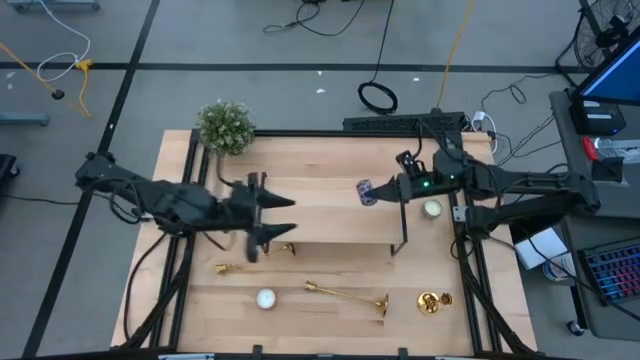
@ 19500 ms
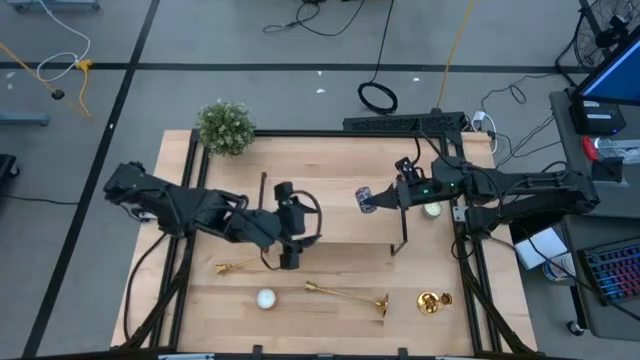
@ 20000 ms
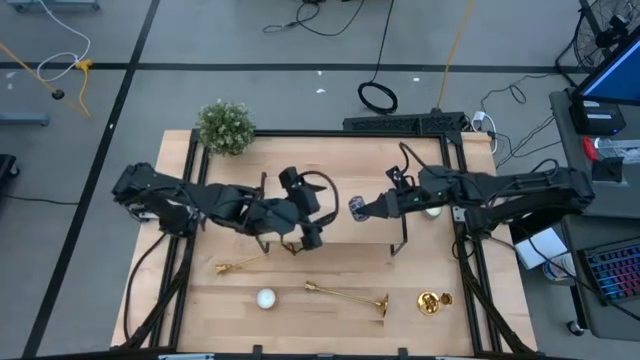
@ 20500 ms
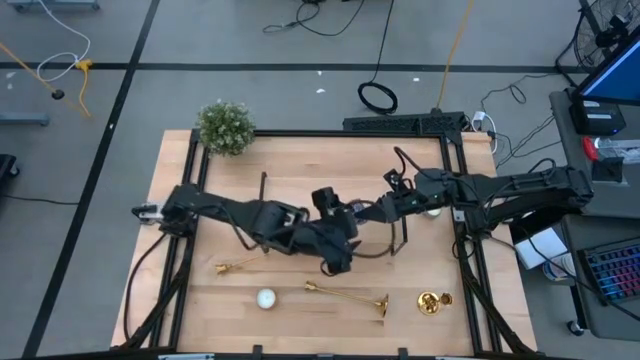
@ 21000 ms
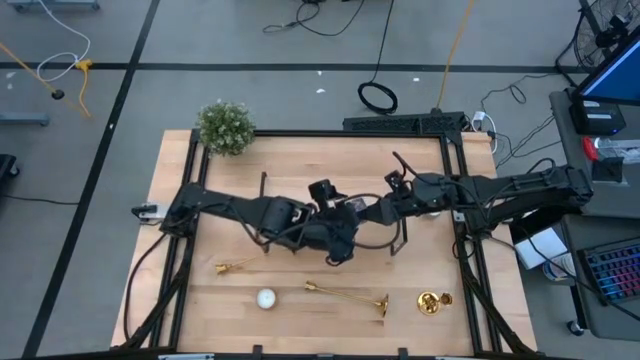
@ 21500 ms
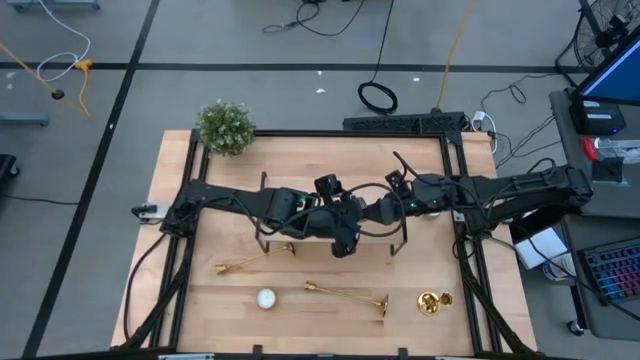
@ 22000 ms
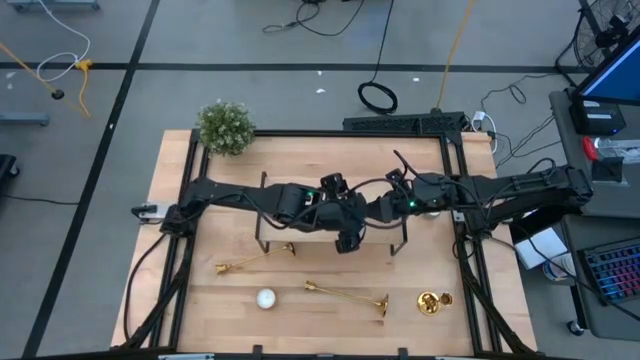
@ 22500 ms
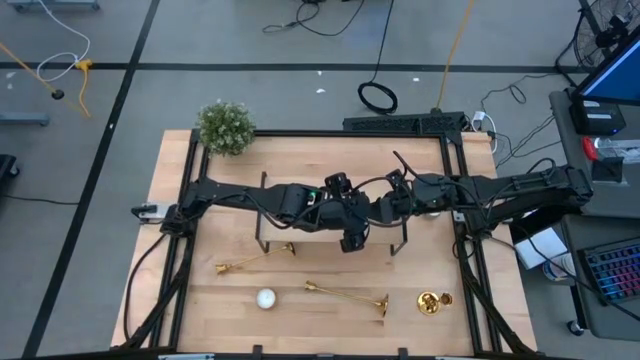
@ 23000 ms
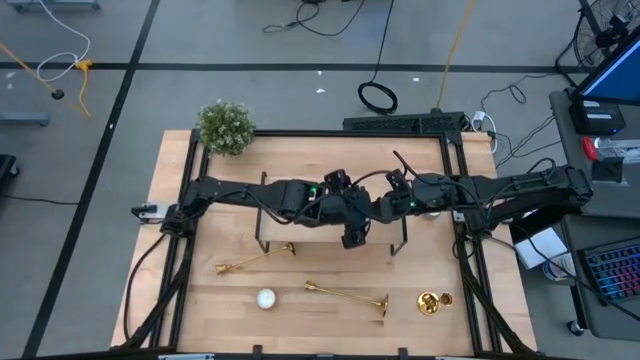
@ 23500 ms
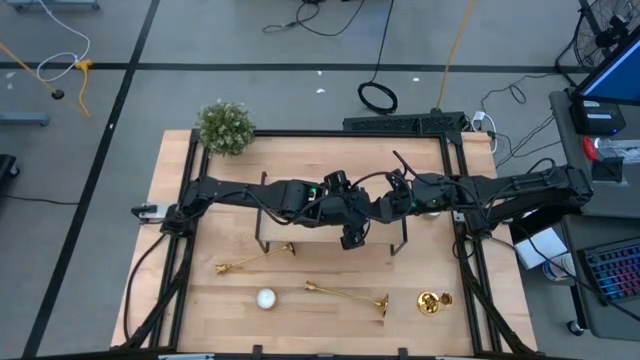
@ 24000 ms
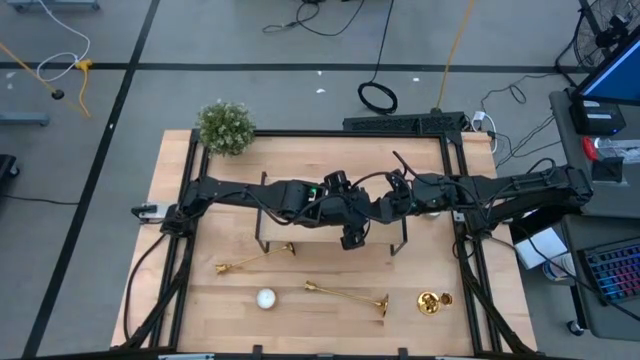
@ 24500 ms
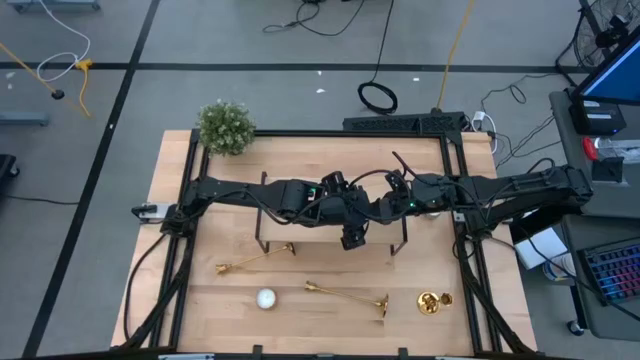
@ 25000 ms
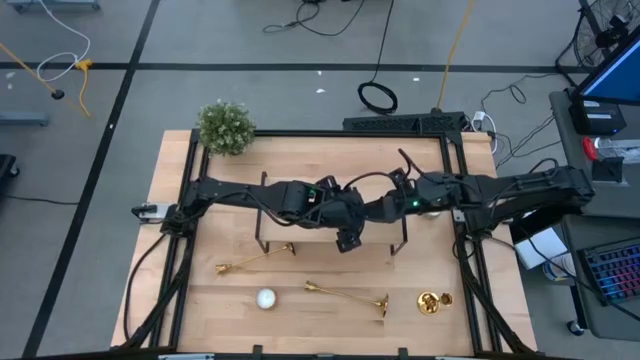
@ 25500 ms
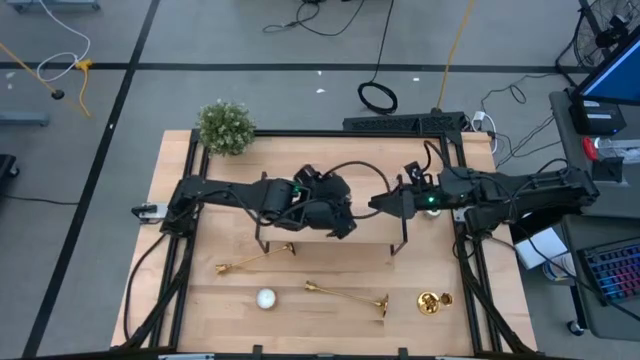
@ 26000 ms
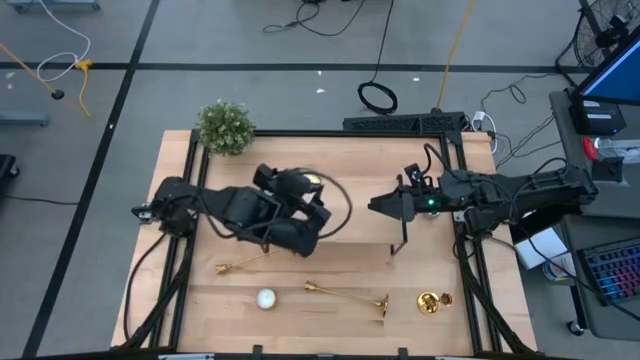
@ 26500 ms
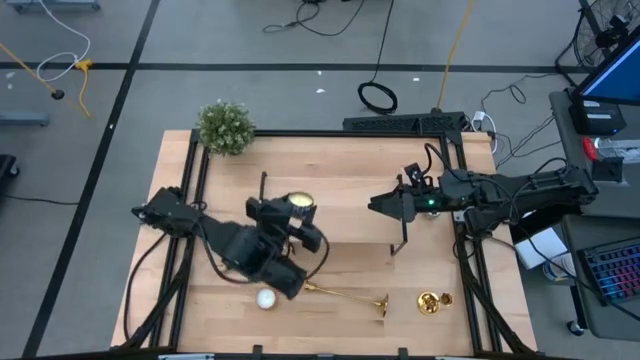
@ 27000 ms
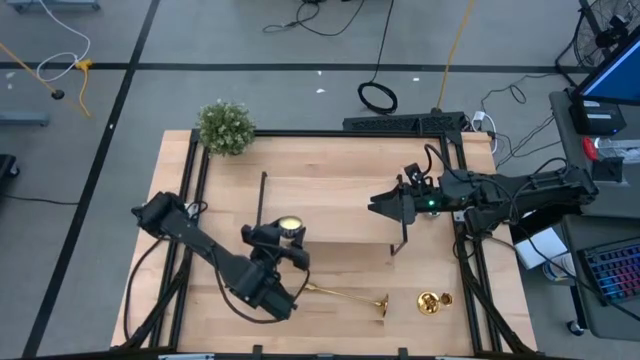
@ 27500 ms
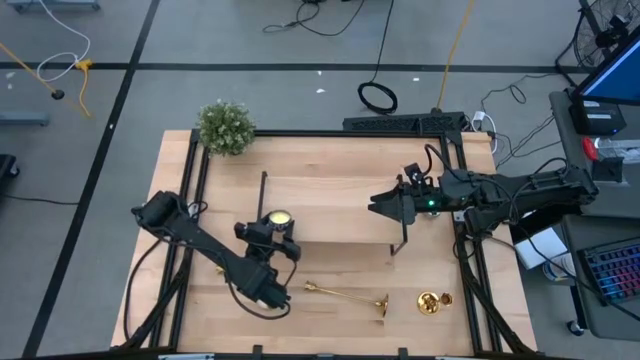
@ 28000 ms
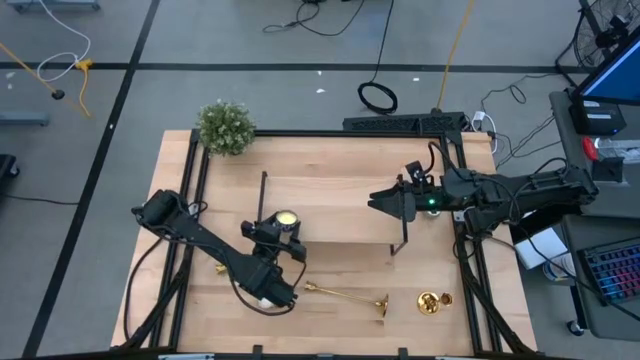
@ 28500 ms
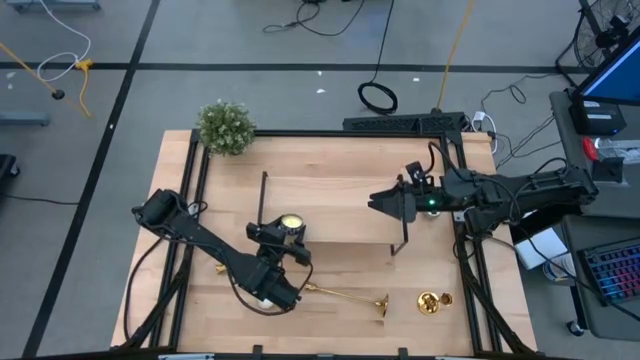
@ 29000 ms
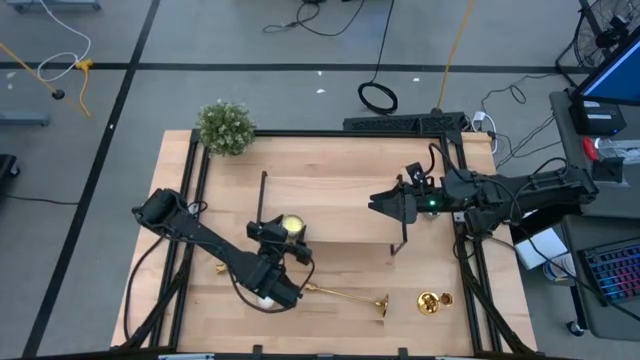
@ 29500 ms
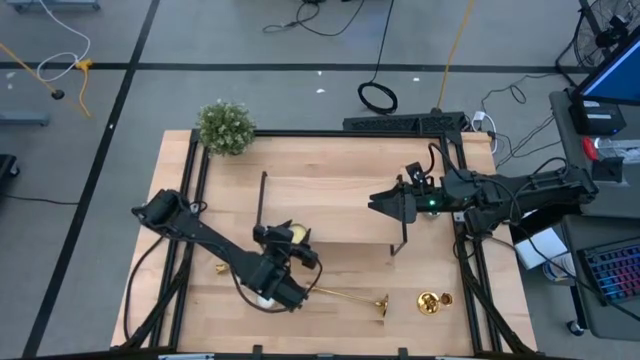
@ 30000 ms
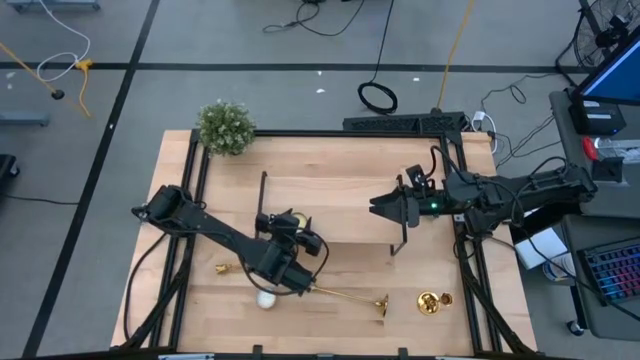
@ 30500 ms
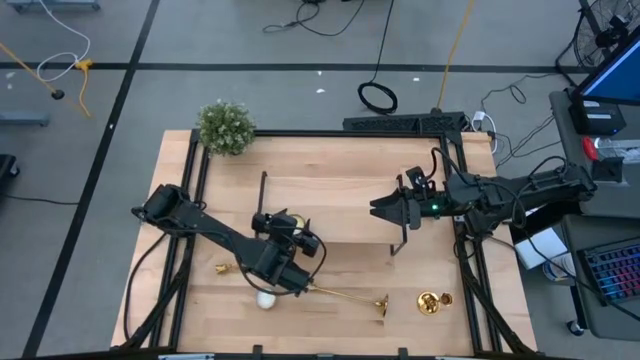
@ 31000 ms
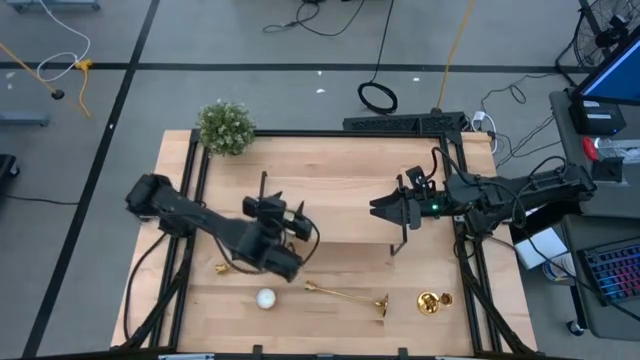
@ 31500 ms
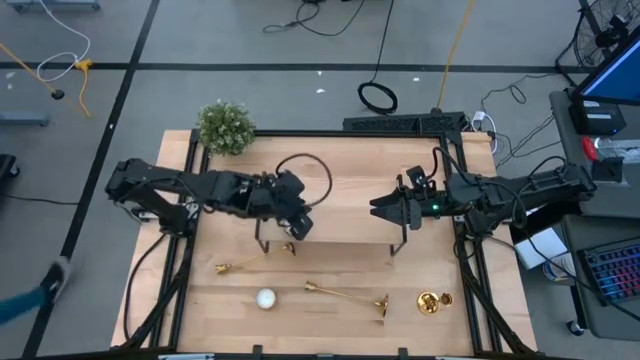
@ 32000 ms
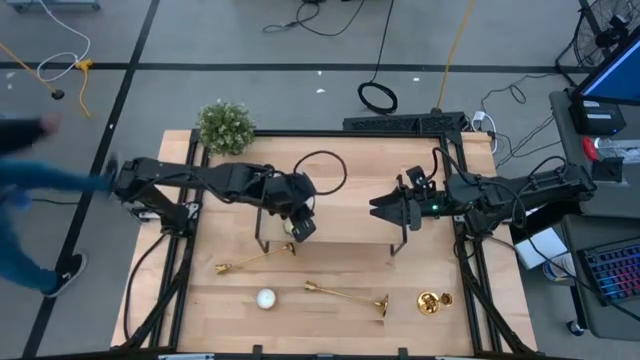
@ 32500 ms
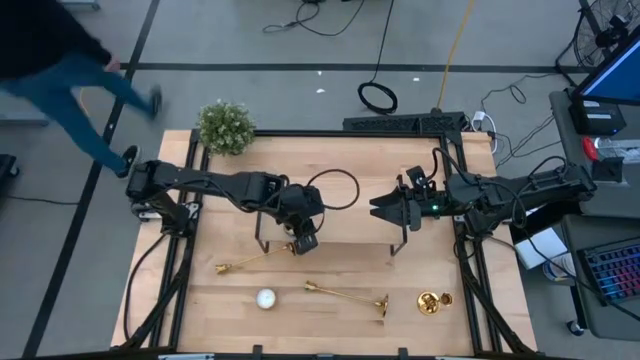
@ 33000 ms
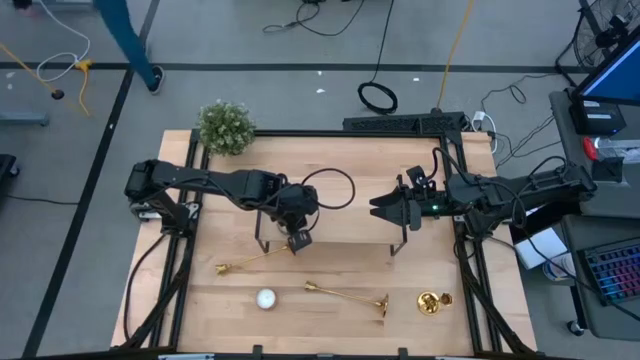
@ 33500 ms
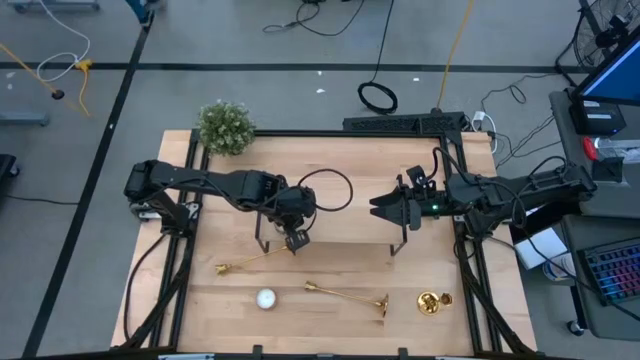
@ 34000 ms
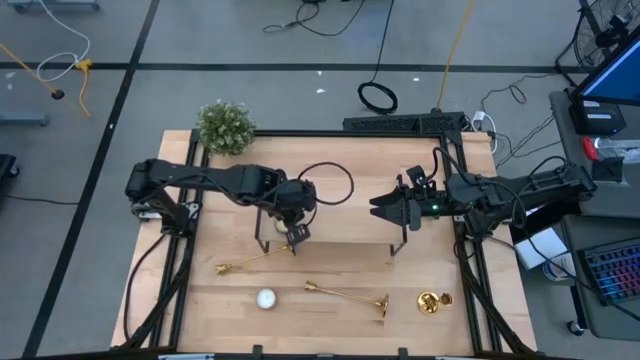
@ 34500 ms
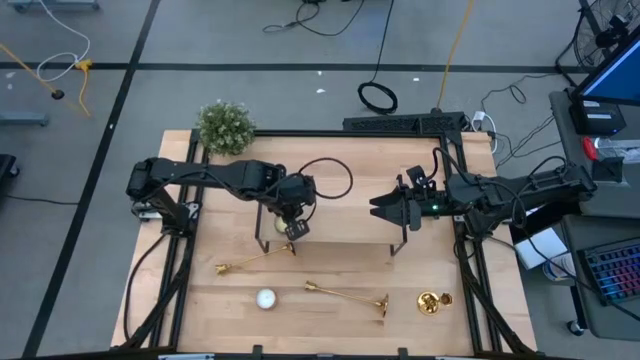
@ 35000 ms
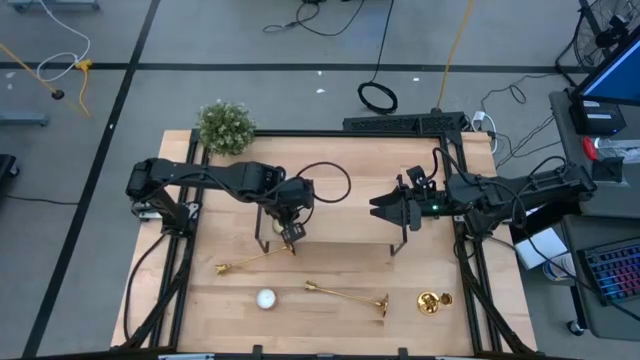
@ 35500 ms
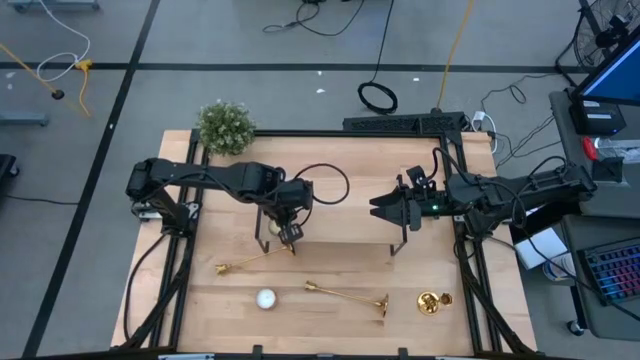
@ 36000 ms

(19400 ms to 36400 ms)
Task: Pick & Place candle stick holders
Put the black scented candle on the shelf
